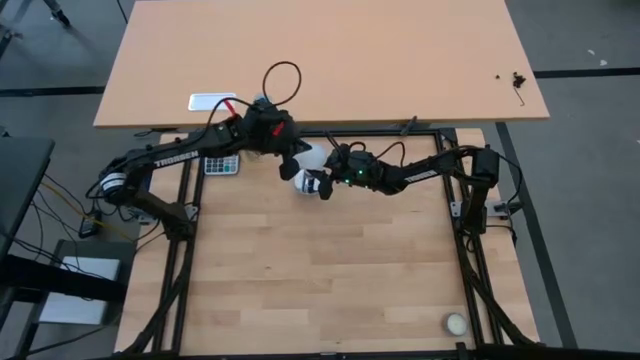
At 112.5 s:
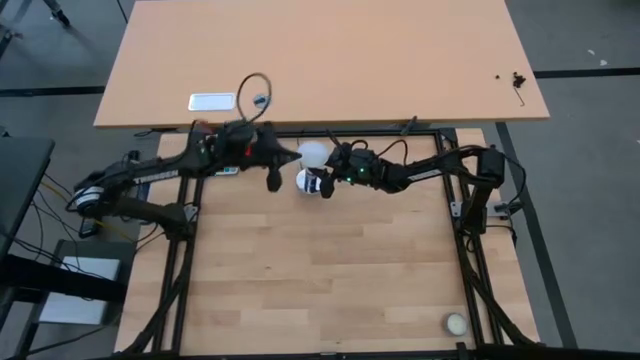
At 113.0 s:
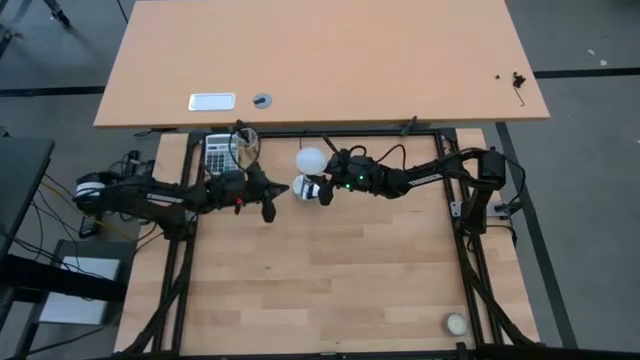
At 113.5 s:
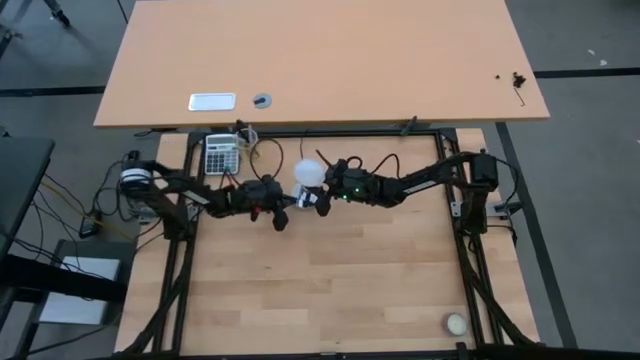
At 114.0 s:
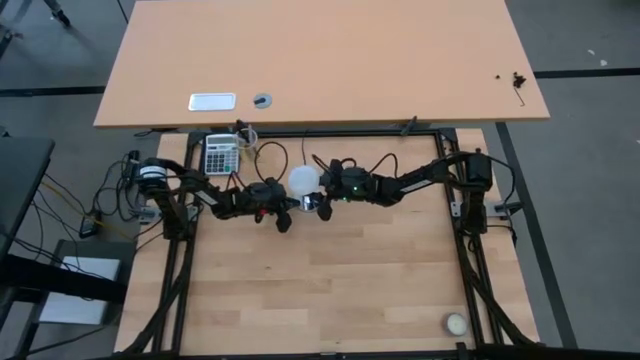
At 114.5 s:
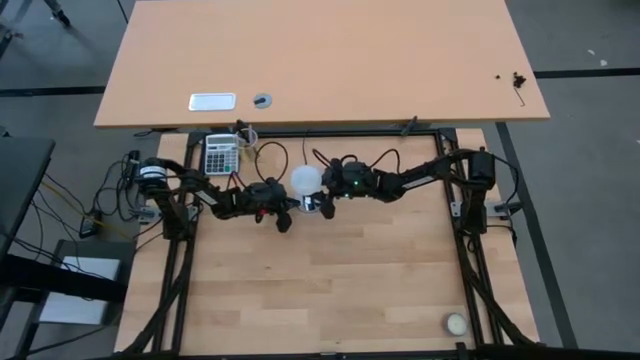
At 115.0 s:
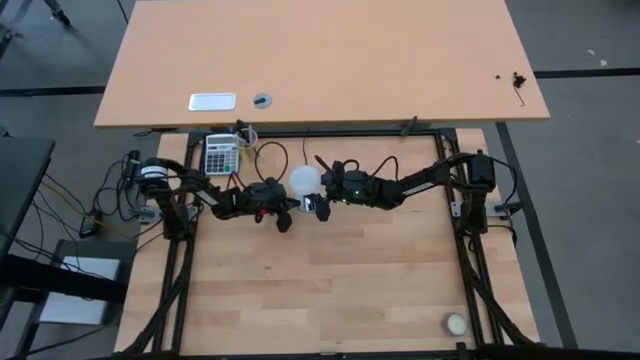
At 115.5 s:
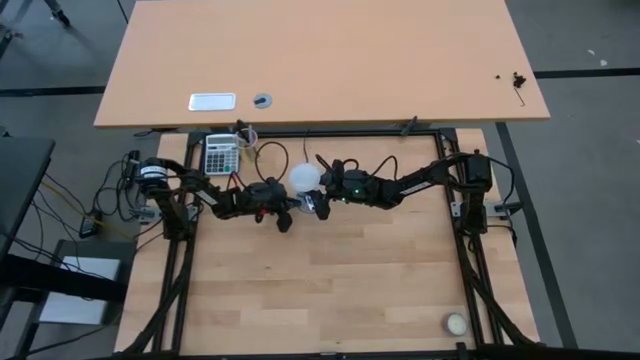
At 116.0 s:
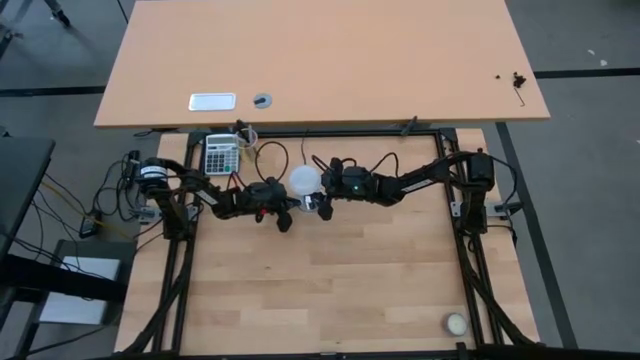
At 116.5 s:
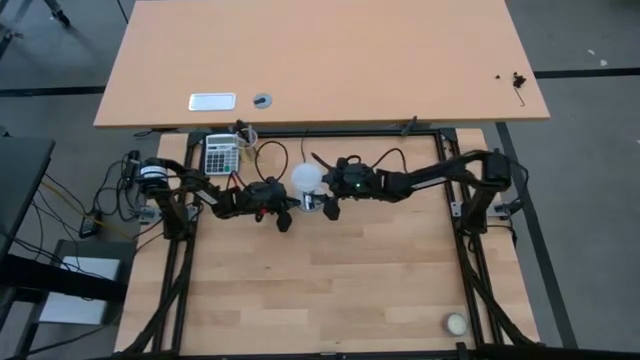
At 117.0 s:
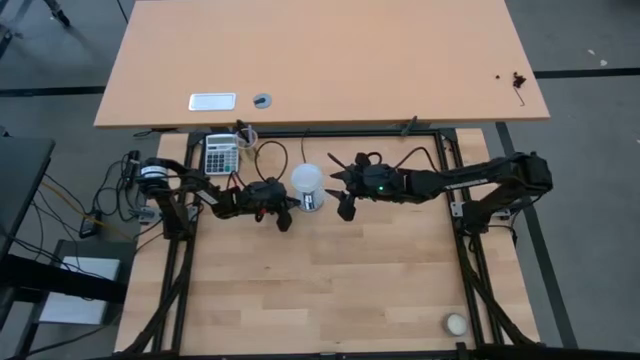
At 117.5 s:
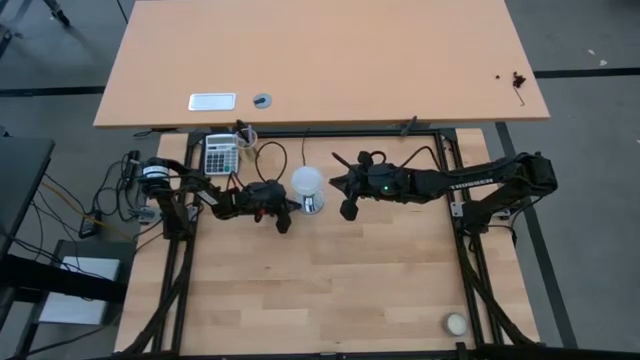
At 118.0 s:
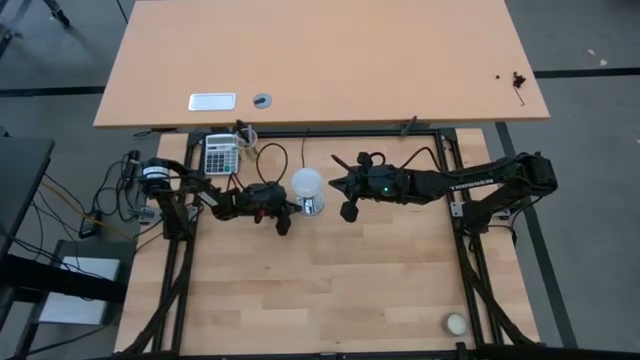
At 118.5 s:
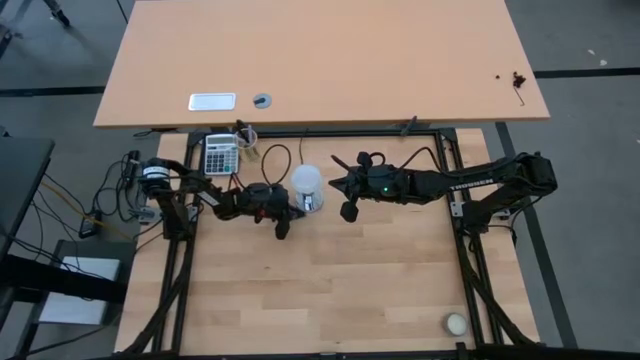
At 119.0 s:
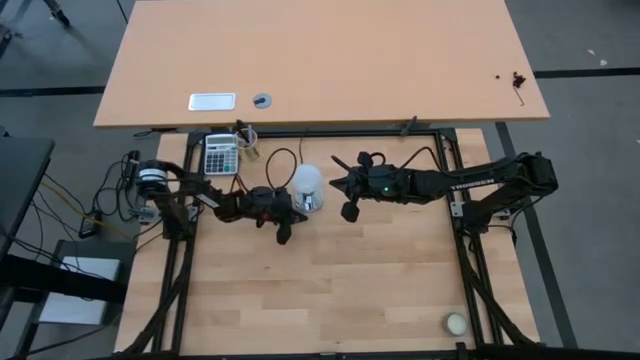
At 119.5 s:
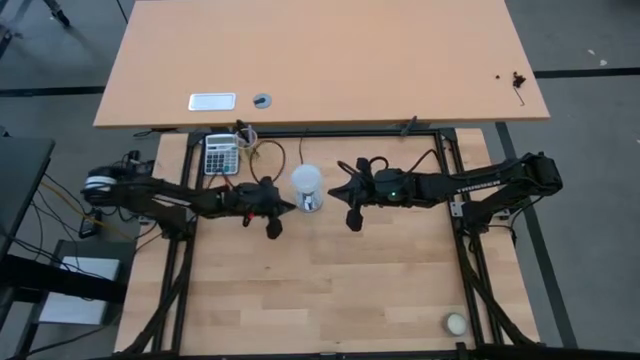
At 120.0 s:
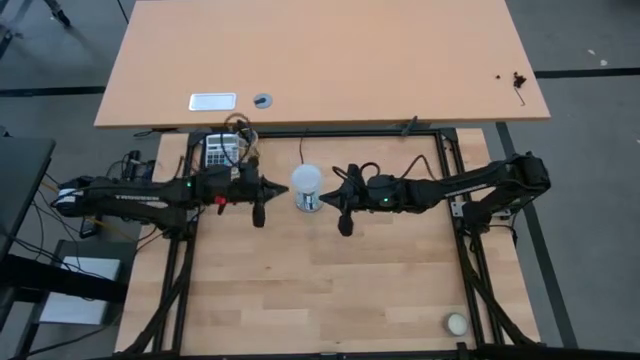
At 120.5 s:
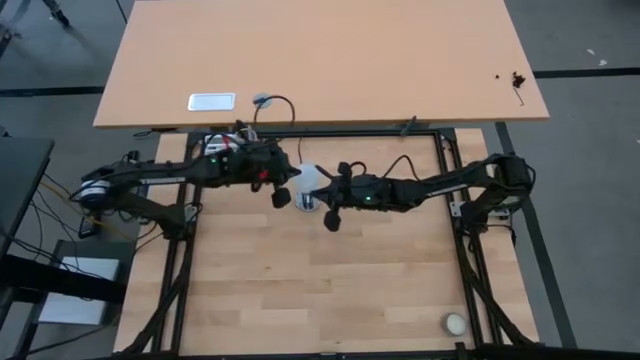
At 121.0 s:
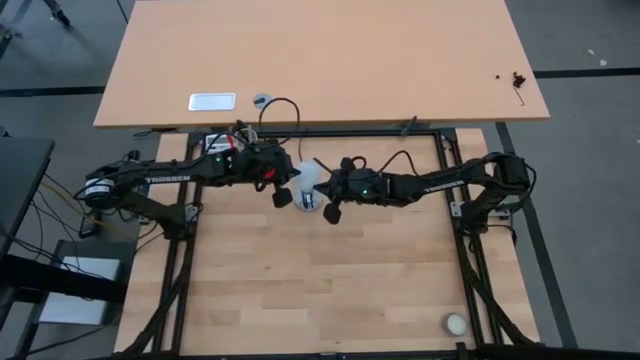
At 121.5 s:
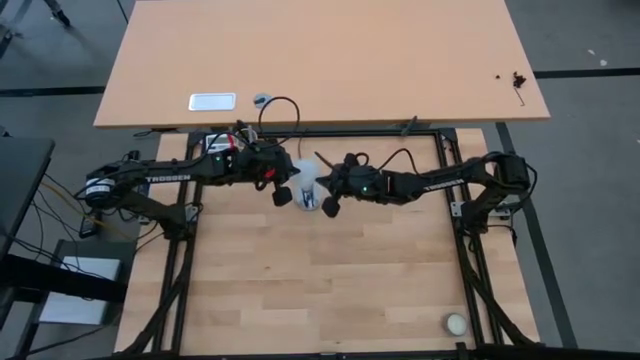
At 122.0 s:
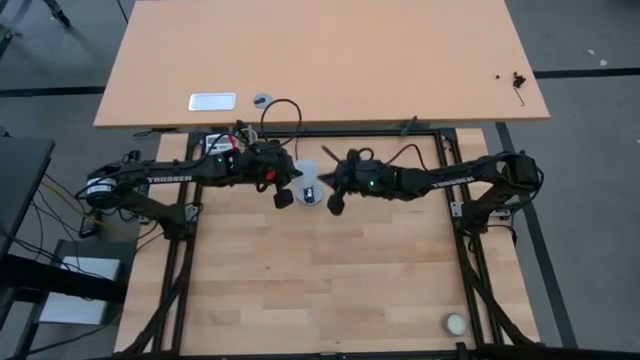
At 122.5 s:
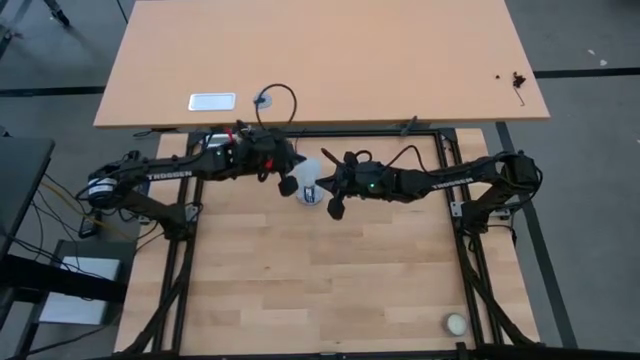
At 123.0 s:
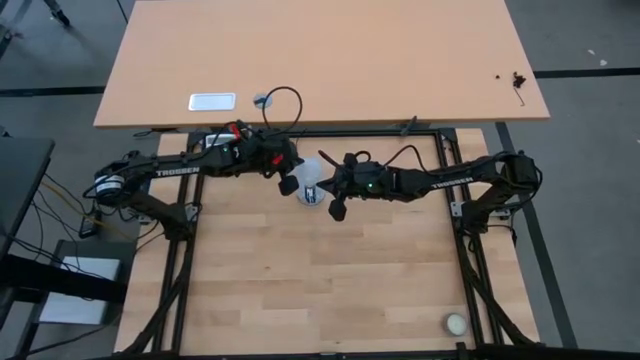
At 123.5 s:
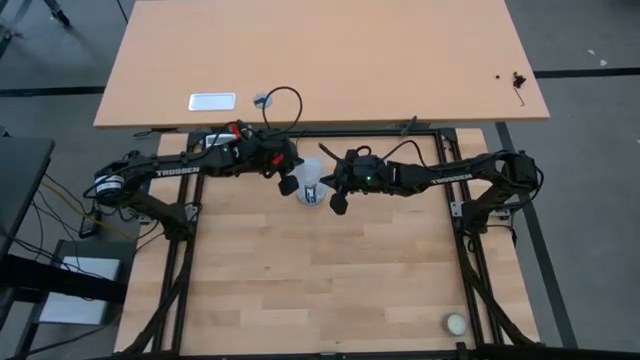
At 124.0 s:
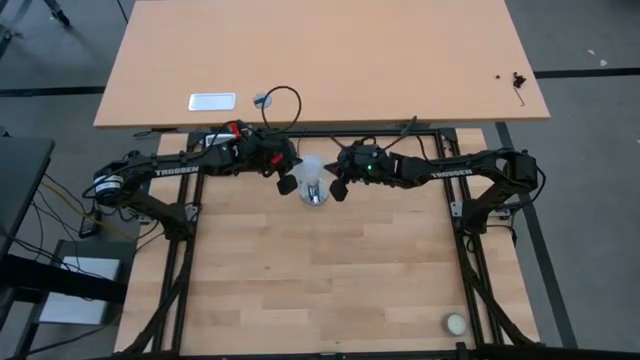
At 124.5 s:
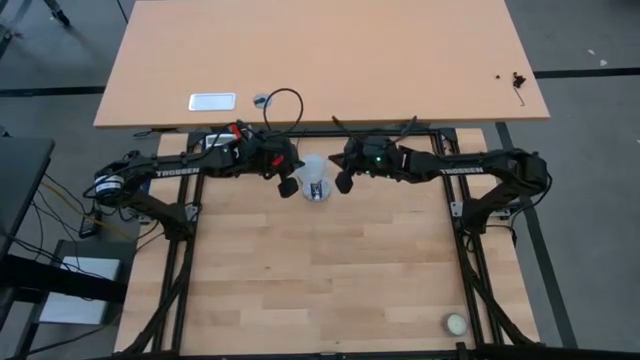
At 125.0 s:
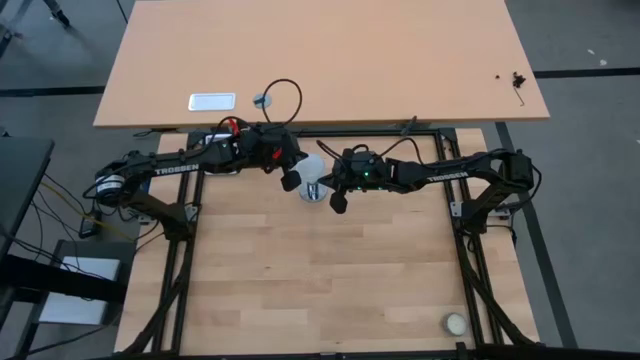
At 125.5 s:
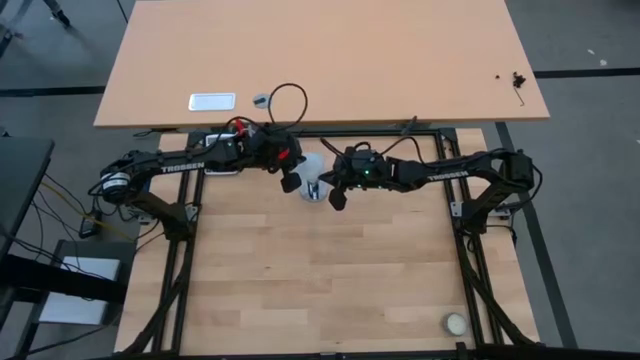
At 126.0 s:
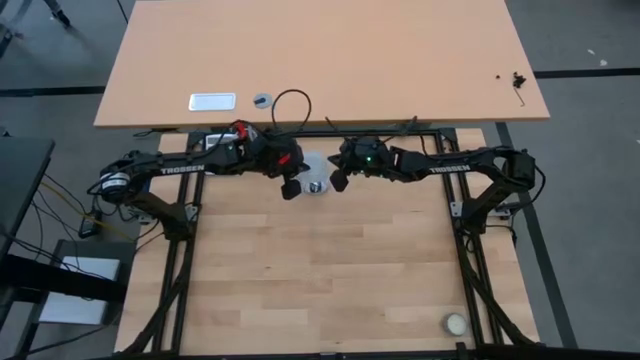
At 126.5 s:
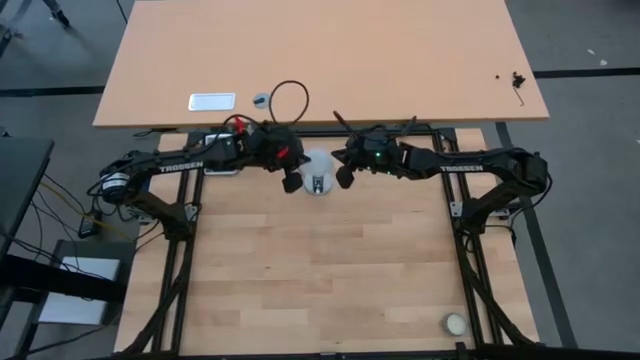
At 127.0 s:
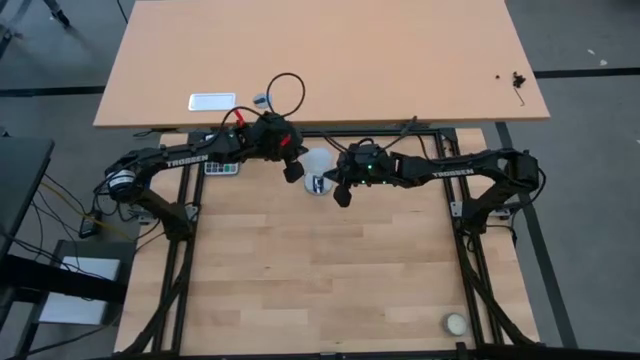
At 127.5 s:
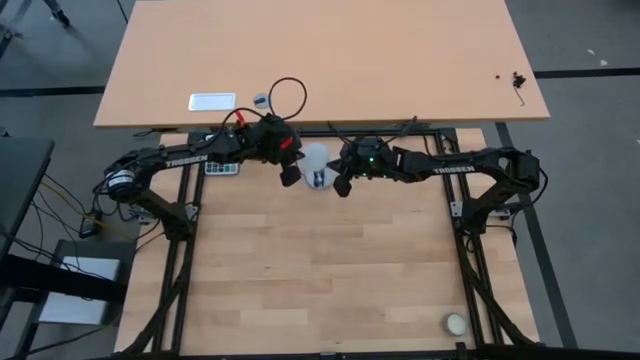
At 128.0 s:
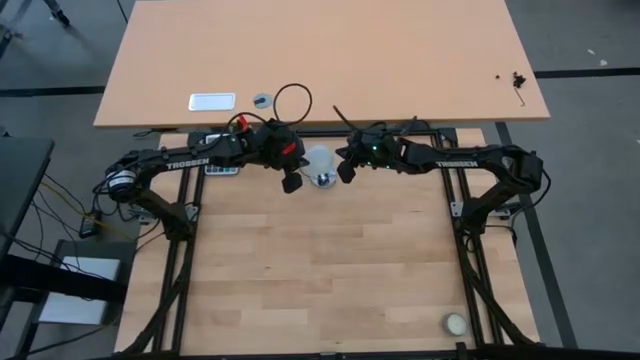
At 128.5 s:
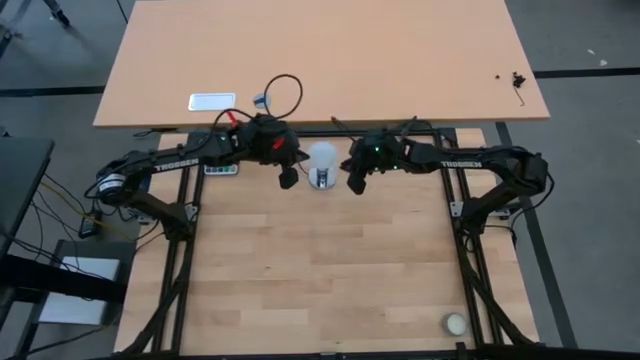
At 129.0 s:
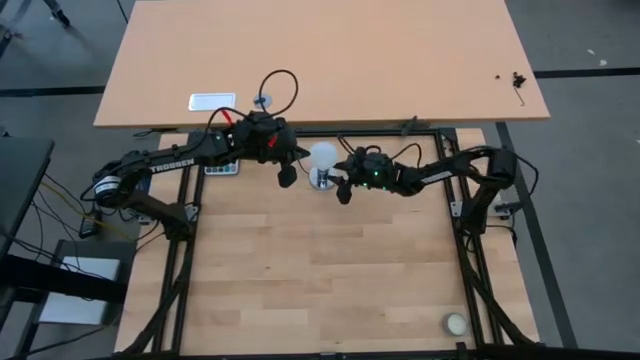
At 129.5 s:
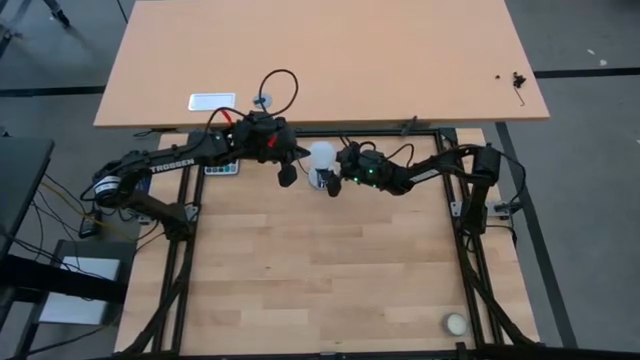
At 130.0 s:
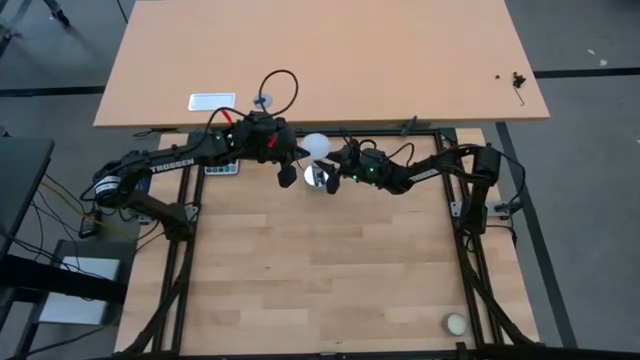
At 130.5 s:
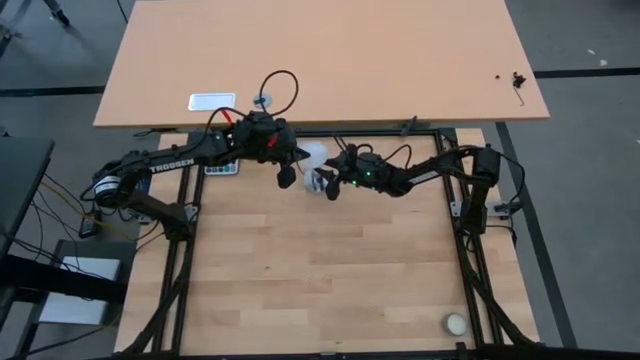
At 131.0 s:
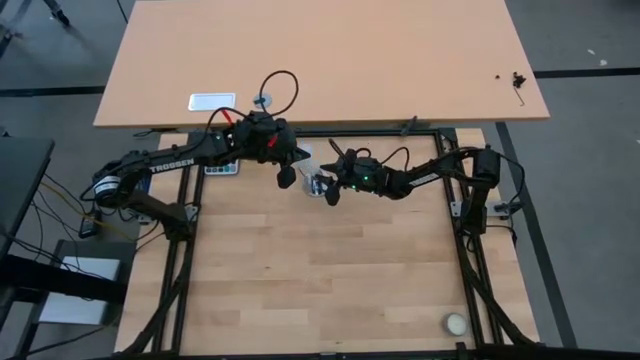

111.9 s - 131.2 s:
Task: Screw lightbulb
Remove the white lightbulb from the silver lamp

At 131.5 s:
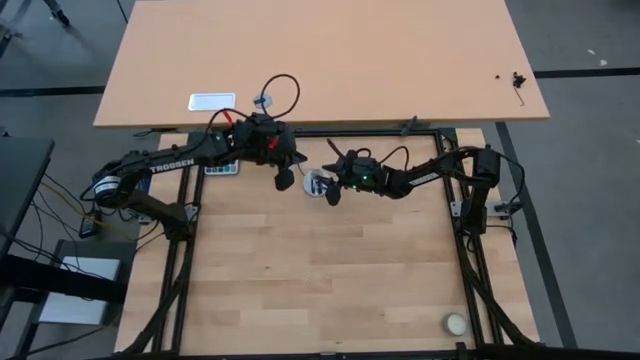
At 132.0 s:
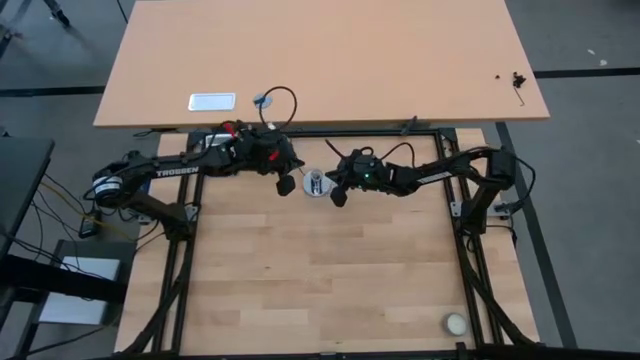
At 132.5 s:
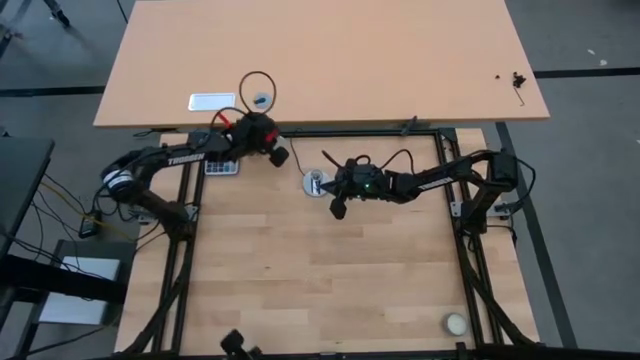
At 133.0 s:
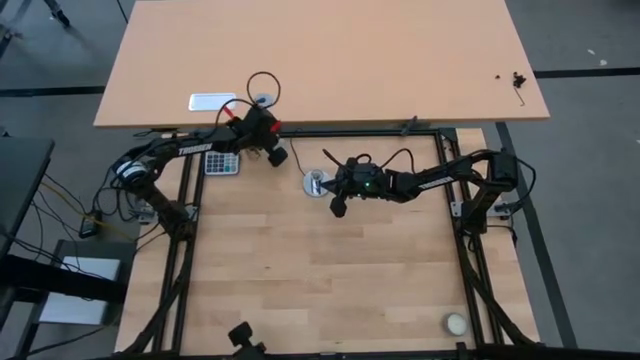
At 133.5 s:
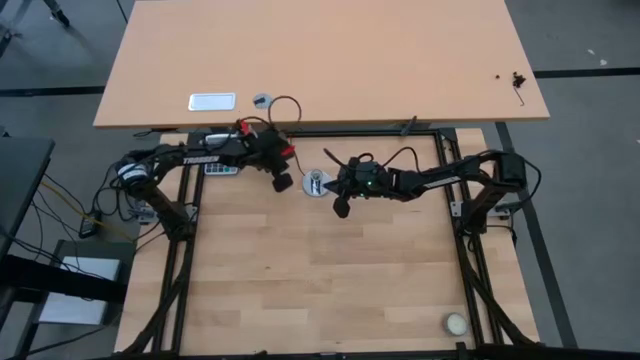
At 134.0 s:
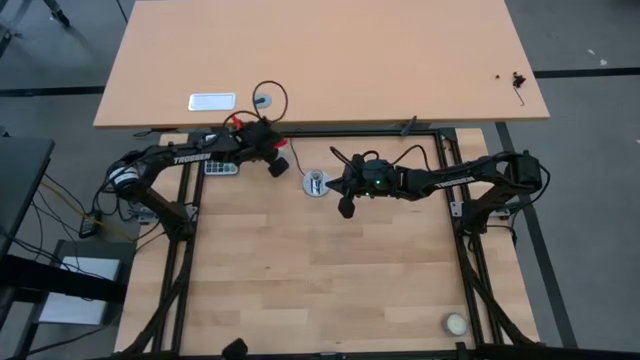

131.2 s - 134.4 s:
Remove the white lightbulb from the silver lamp
